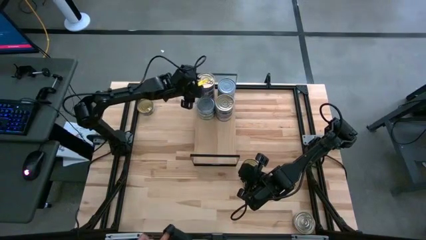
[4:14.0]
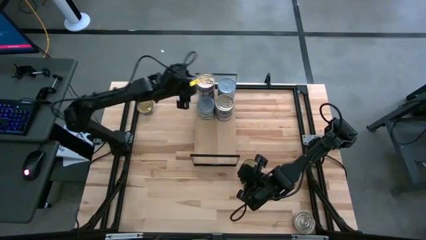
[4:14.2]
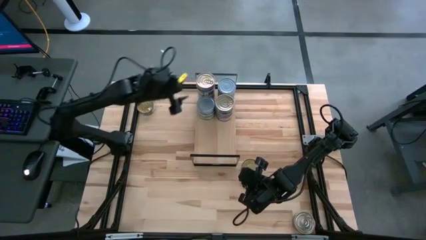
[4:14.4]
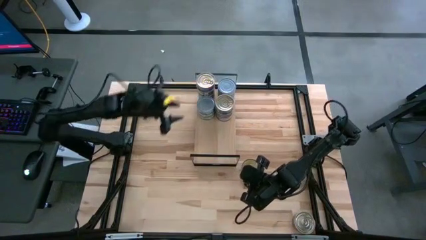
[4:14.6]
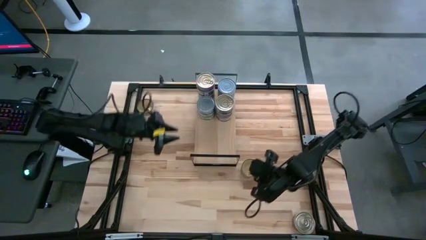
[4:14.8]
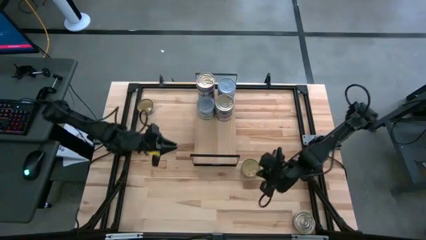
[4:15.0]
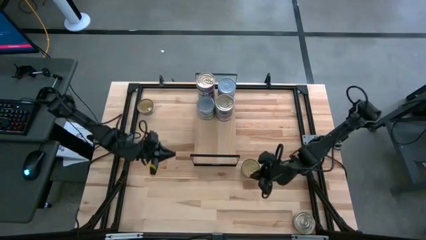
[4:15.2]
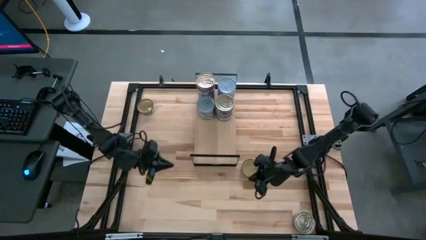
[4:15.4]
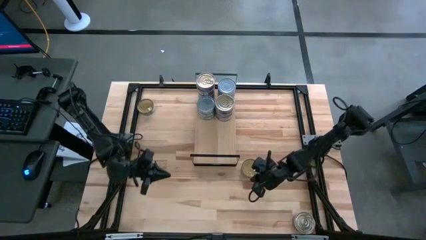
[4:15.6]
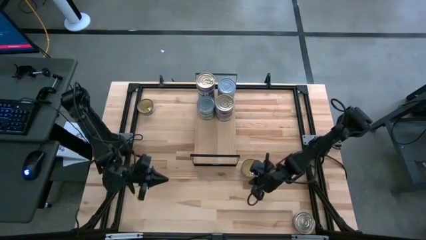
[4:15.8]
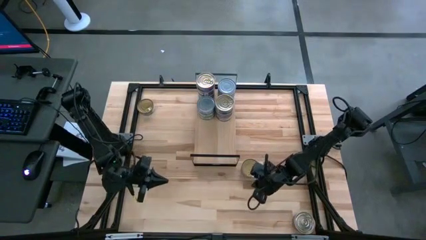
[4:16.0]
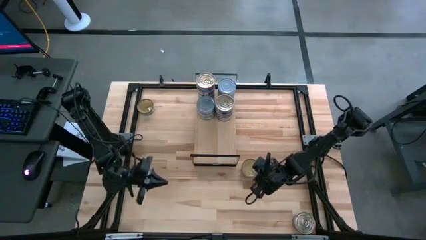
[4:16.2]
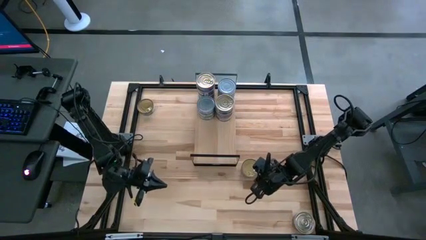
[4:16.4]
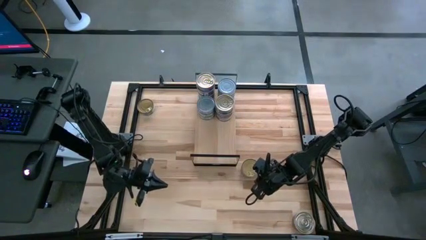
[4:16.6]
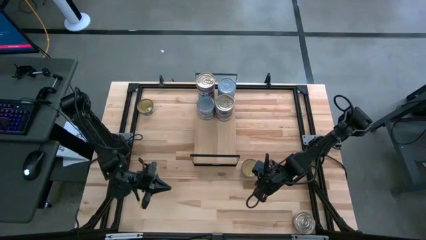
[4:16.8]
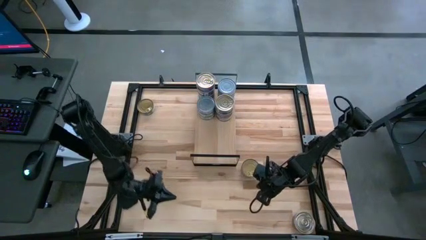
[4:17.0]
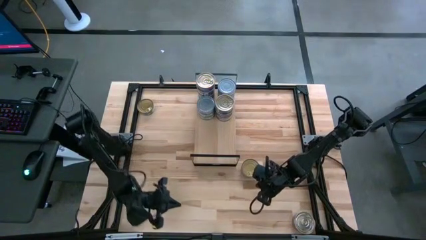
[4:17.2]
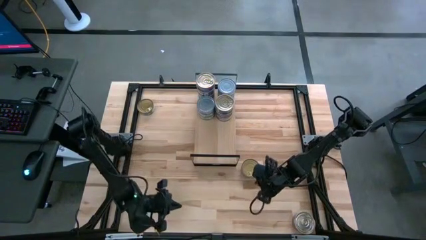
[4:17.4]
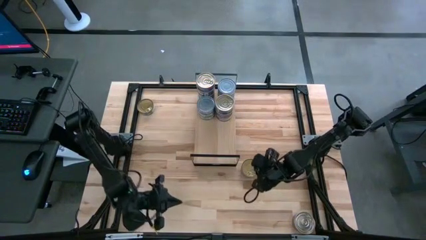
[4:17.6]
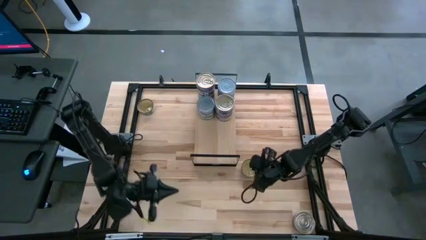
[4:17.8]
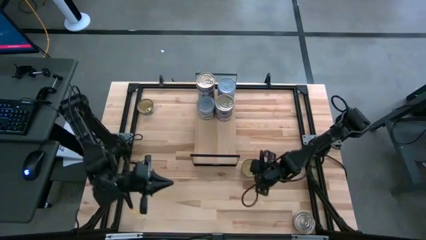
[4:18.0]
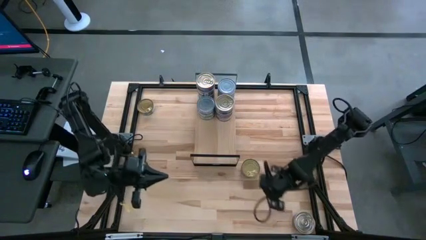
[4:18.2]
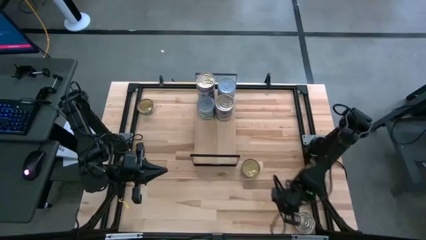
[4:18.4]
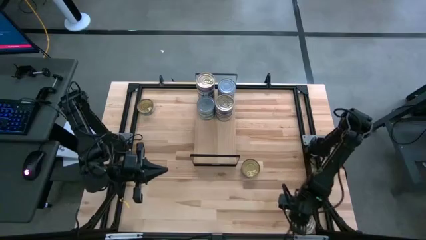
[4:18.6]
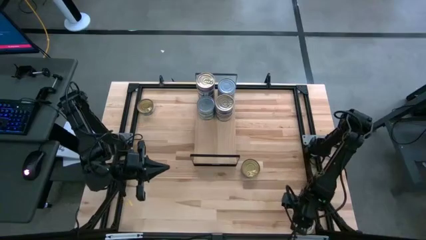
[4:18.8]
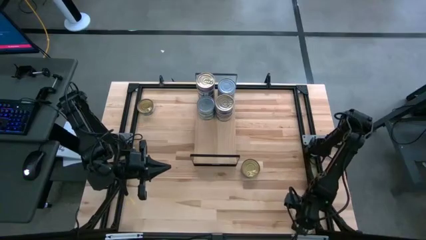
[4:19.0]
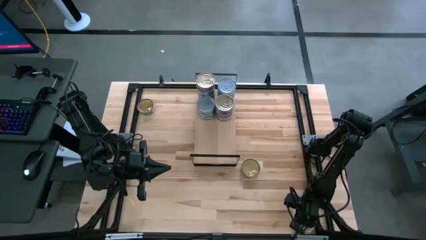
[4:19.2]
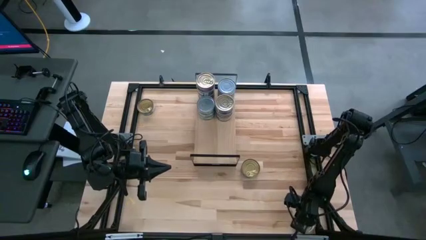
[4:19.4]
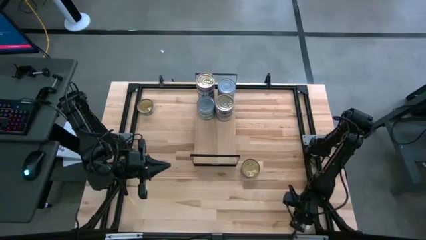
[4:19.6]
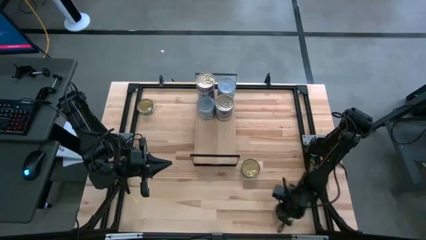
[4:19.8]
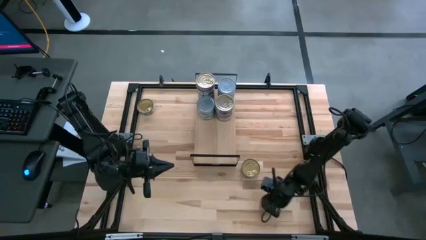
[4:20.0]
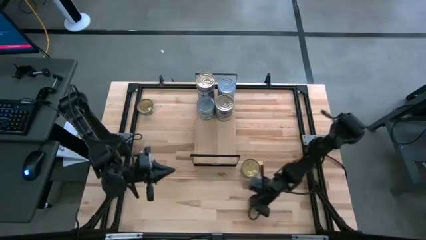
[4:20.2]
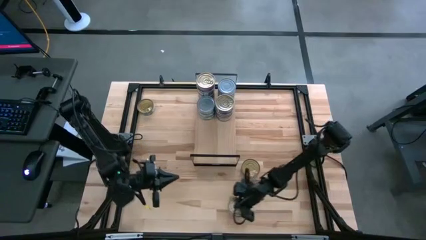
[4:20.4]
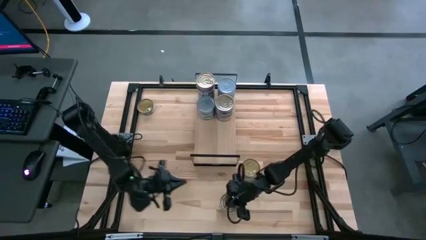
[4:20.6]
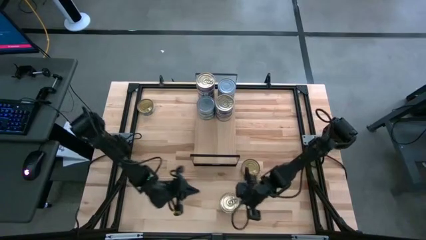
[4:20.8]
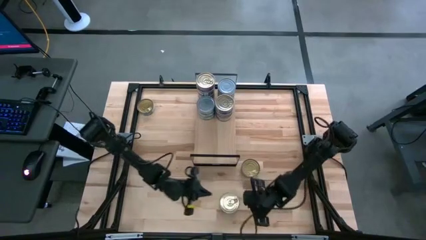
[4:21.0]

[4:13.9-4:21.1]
Task: Stack canned seafood by type on shelf
Move the pink and blue tuna can to the bottom middle of the table

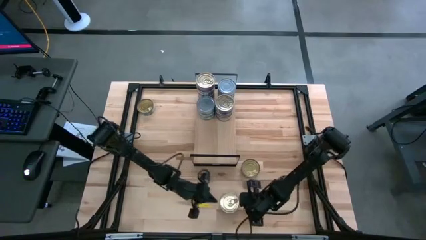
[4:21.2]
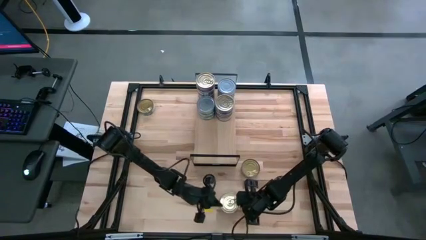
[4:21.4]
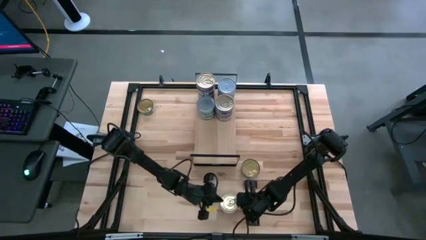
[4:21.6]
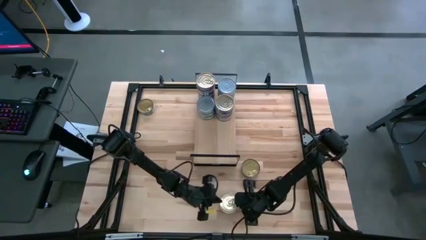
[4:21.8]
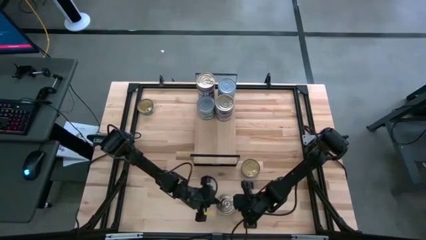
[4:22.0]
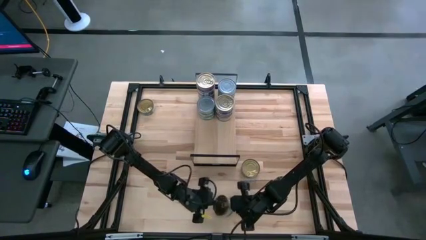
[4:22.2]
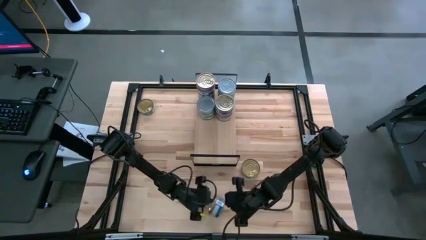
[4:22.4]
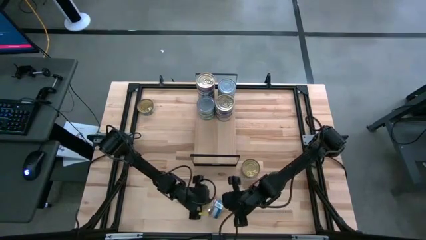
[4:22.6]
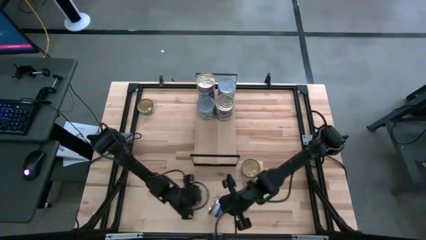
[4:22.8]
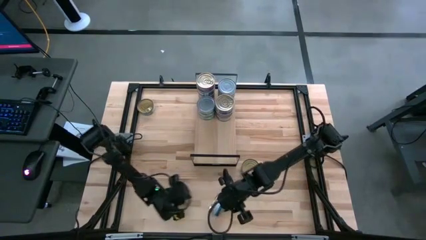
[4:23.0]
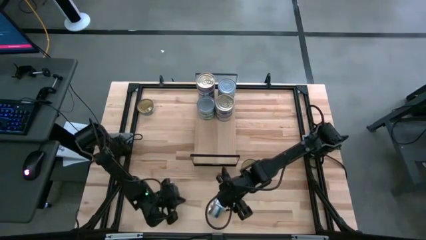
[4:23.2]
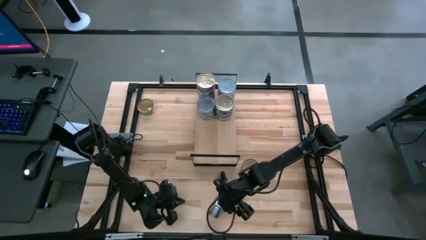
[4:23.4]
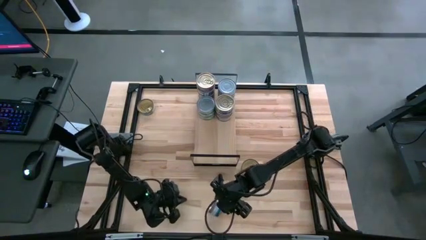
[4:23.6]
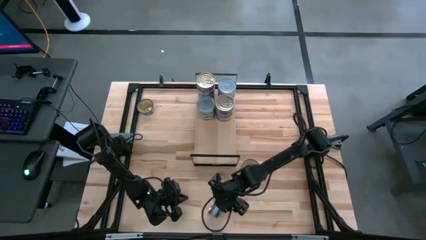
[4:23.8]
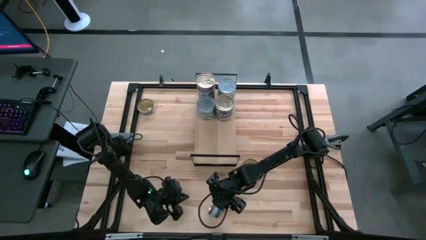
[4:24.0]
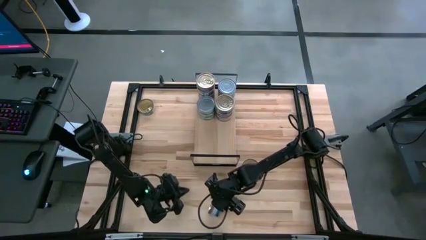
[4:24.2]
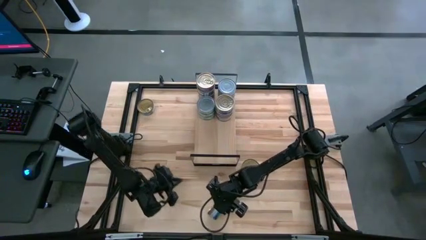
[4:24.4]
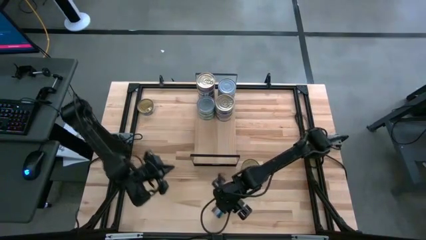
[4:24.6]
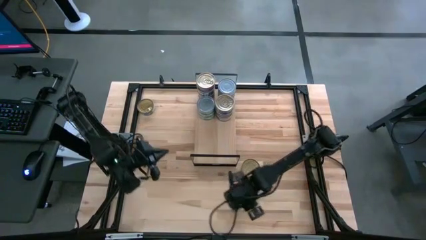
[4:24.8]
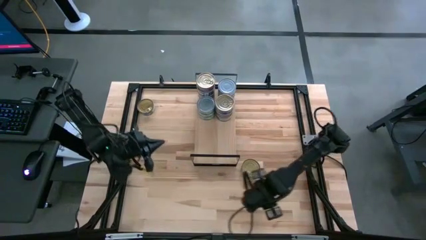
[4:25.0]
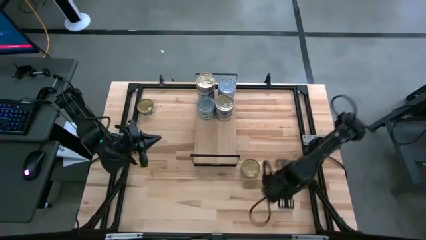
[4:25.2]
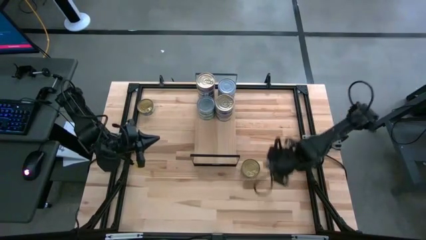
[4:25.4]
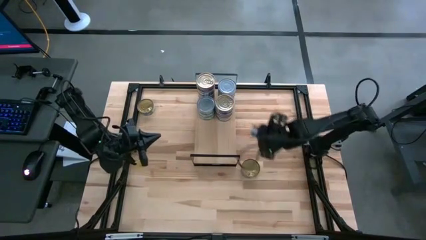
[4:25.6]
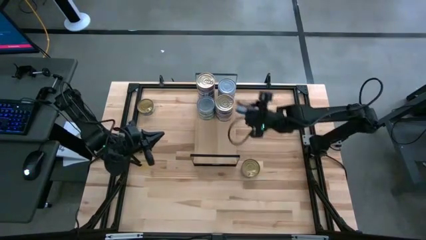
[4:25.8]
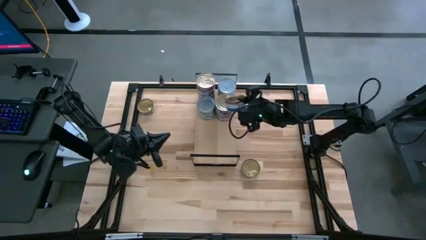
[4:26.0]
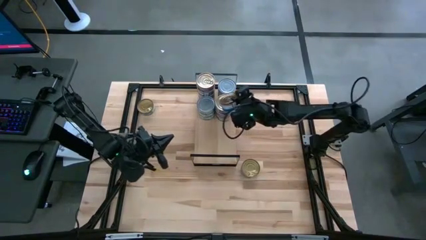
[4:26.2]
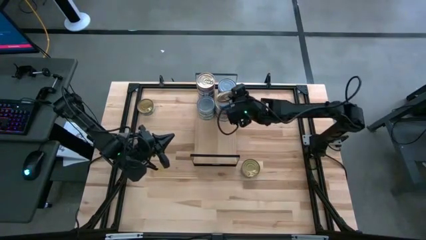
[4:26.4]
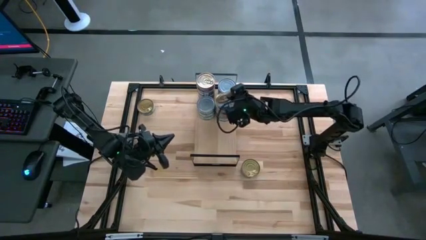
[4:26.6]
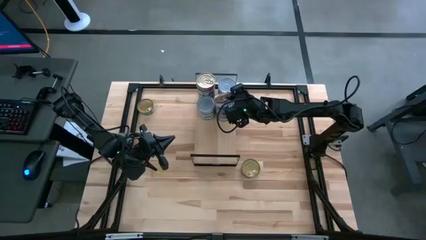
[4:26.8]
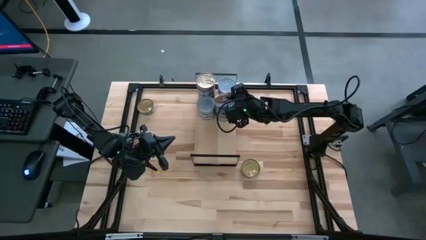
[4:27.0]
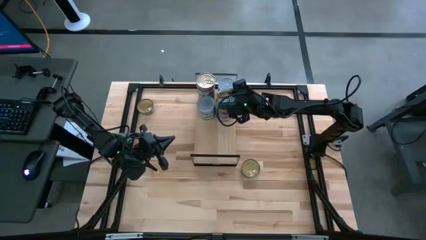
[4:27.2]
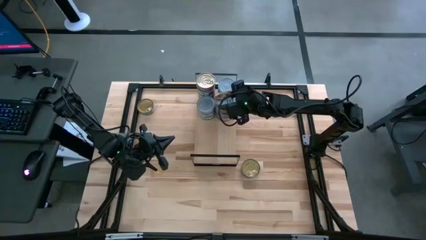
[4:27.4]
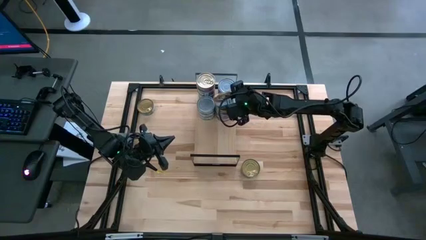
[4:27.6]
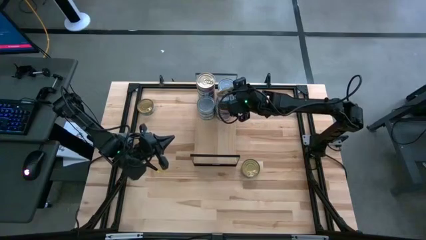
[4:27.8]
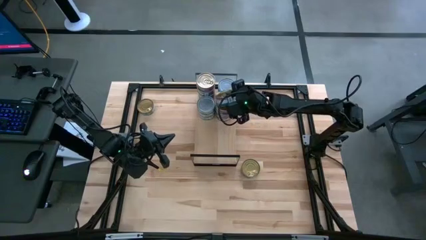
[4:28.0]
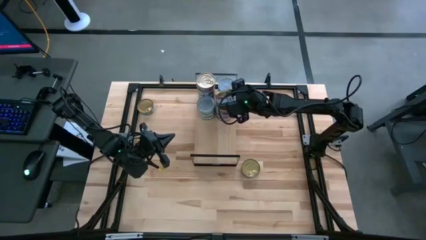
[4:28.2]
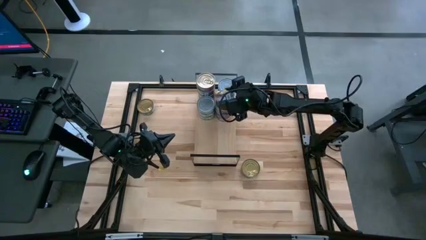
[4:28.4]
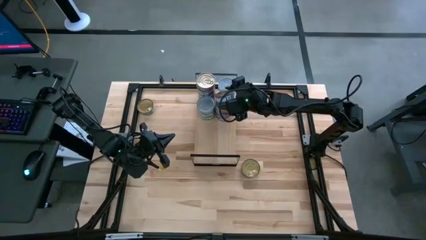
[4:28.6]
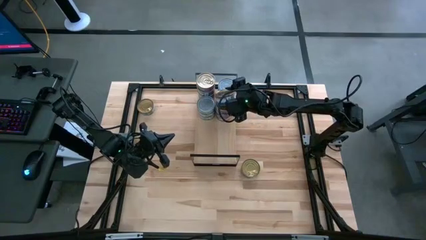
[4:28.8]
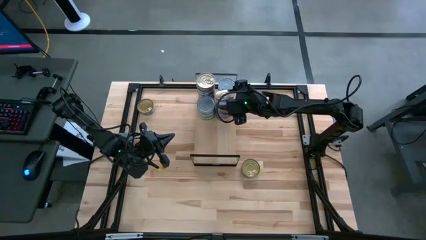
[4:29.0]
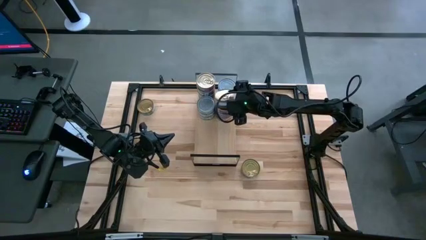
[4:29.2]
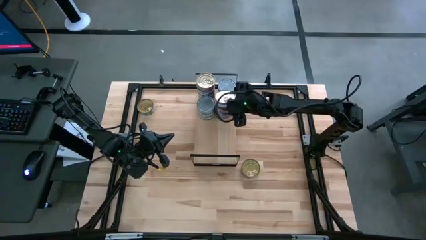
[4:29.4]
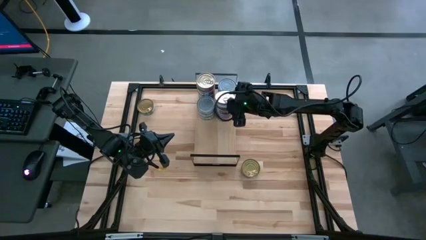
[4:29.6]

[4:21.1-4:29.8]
Stack the pink and blue tuna cans on top of the pink and blue tuna can

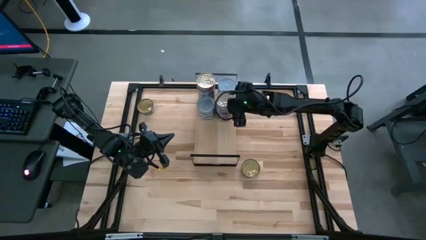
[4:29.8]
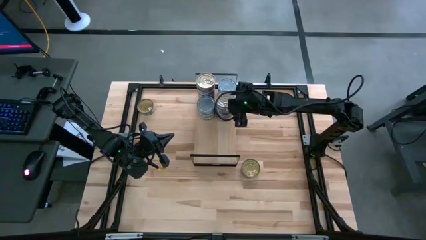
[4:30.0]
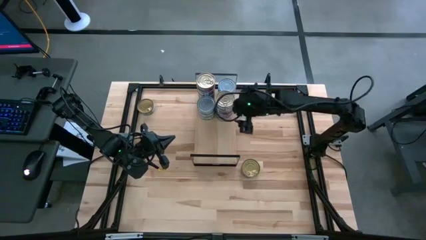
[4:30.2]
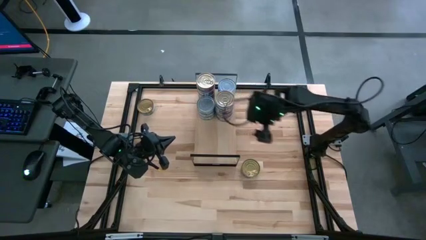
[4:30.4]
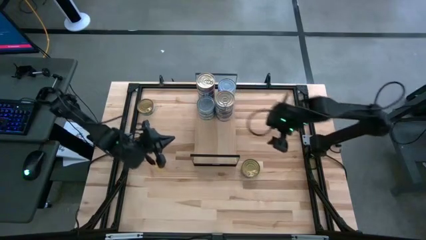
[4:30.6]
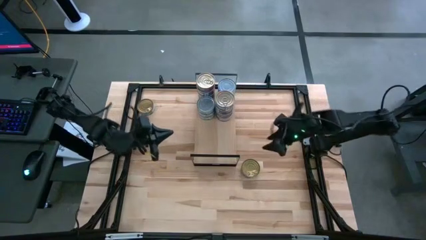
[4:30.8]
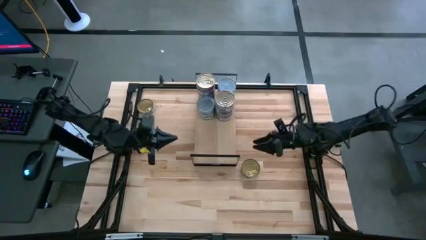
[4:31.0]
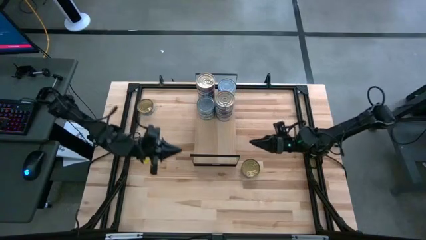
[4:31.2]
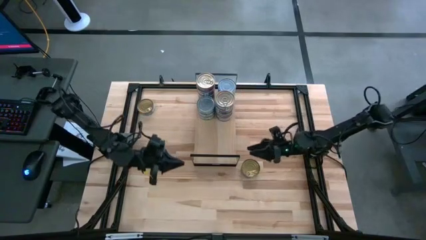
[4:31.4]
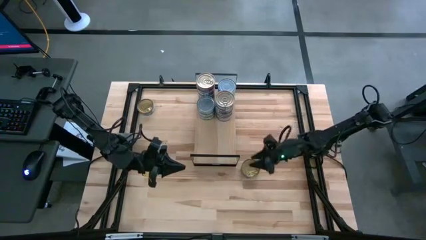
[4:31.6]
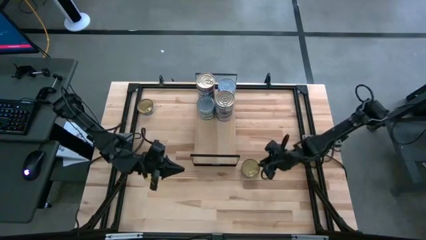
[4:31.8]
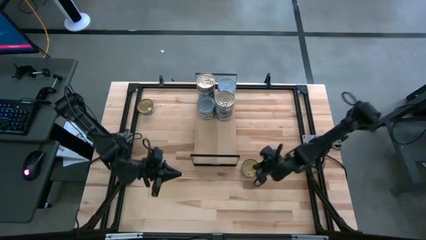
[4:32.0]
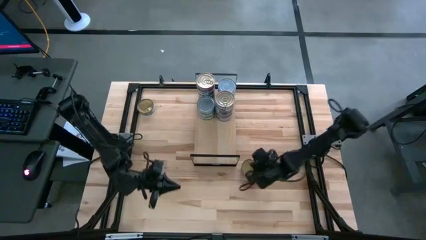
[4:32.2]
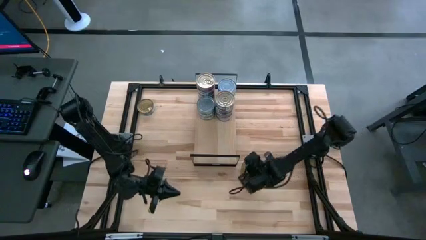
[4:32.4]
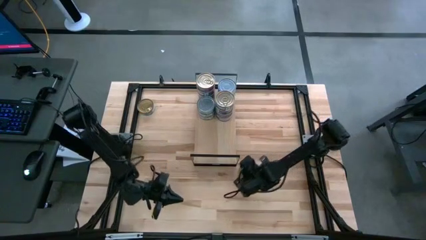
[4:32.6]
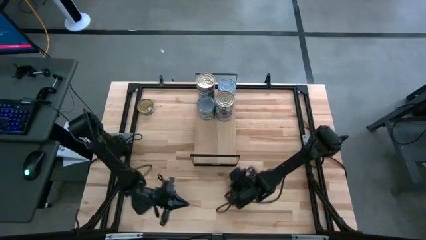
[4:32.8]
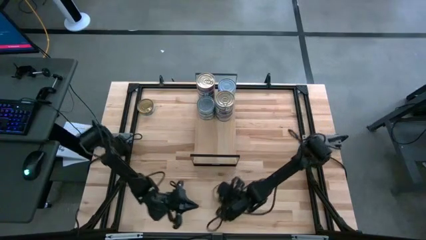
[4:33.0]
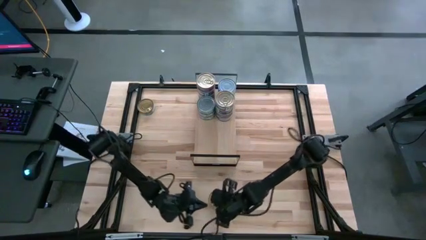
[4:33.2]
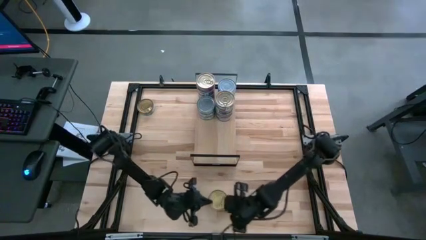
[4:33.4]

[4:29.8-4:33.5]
Move the green tuna can to the bottom middle of the table
